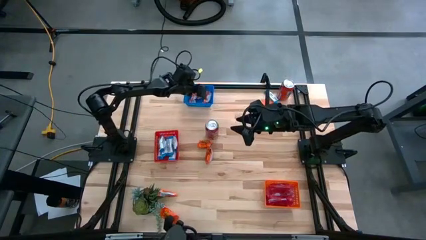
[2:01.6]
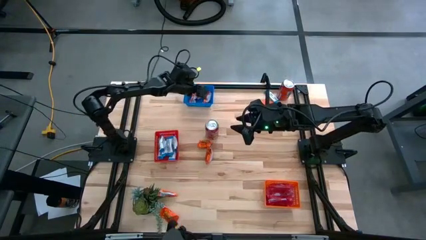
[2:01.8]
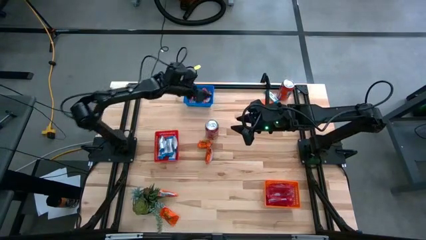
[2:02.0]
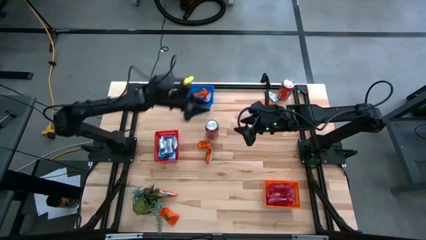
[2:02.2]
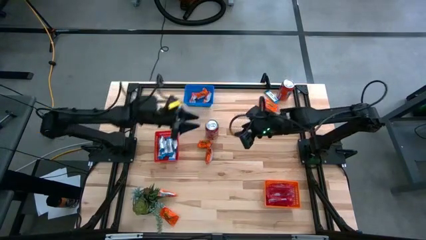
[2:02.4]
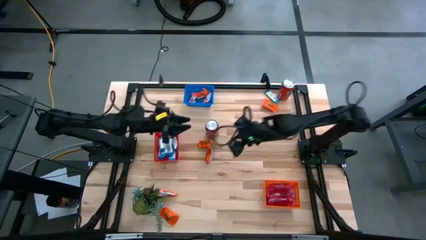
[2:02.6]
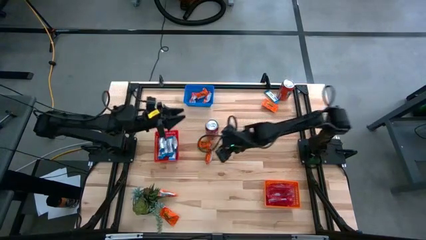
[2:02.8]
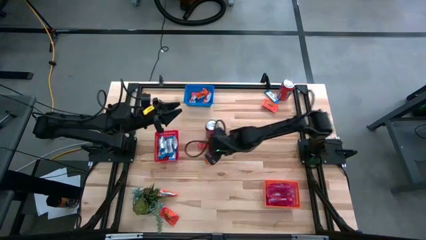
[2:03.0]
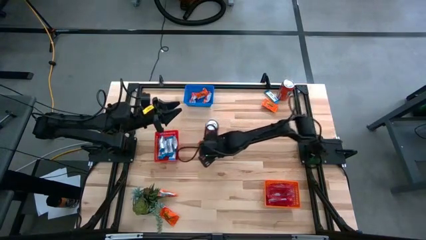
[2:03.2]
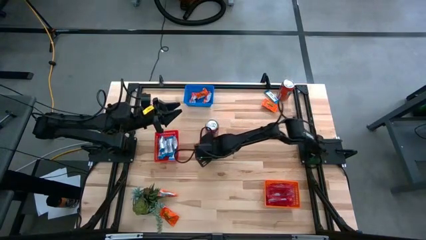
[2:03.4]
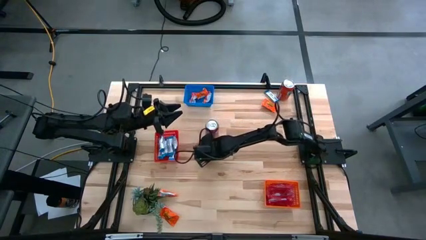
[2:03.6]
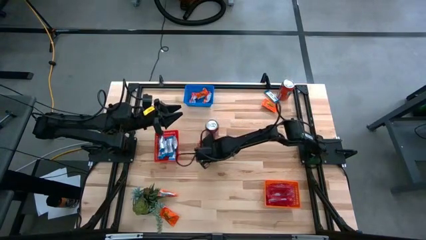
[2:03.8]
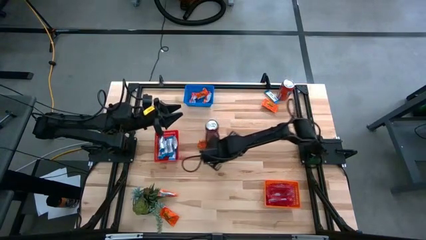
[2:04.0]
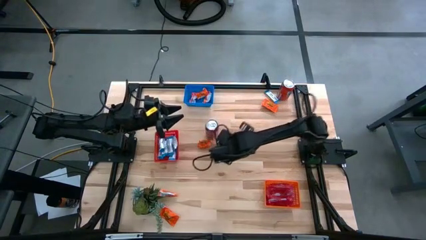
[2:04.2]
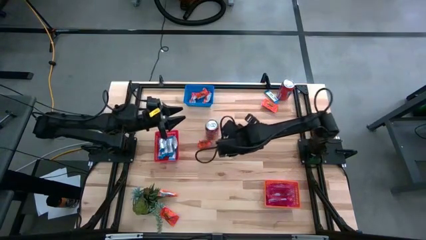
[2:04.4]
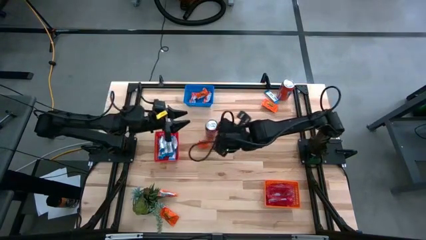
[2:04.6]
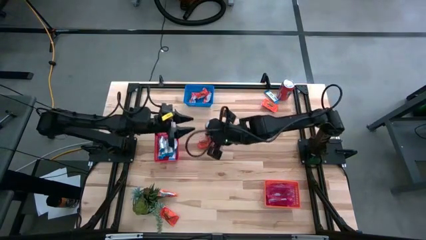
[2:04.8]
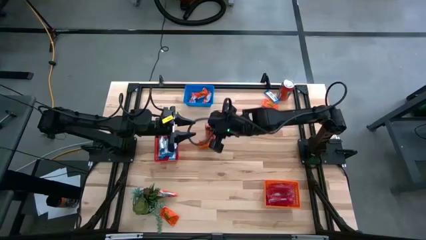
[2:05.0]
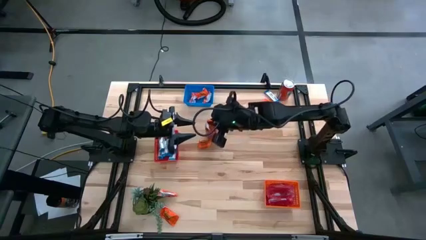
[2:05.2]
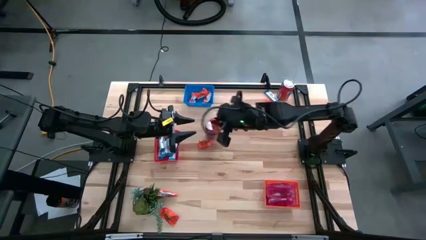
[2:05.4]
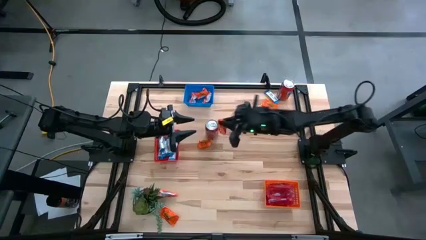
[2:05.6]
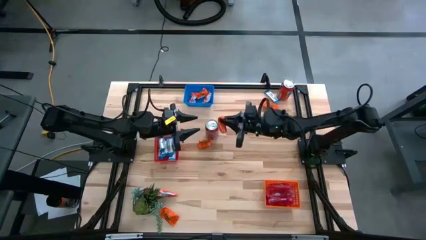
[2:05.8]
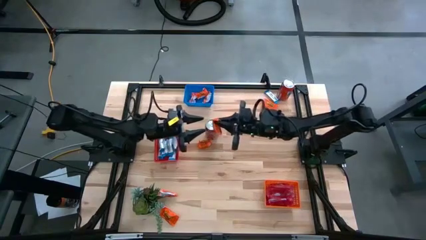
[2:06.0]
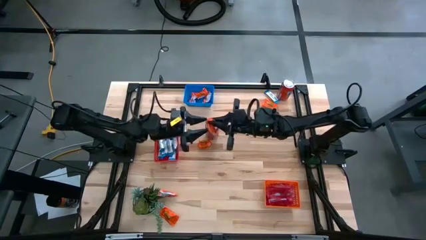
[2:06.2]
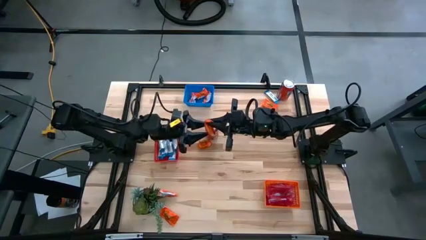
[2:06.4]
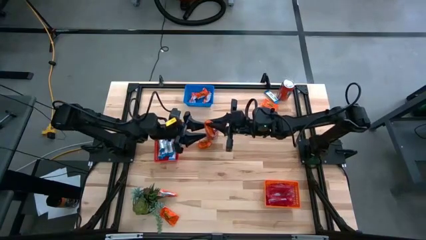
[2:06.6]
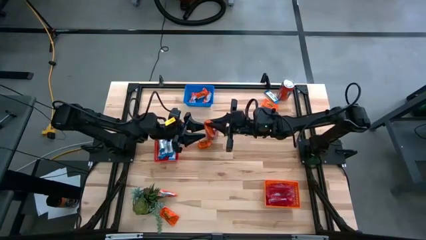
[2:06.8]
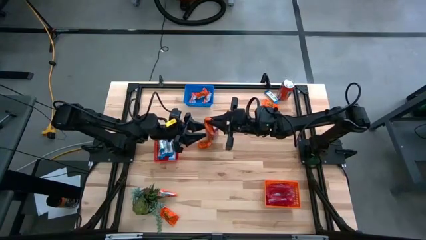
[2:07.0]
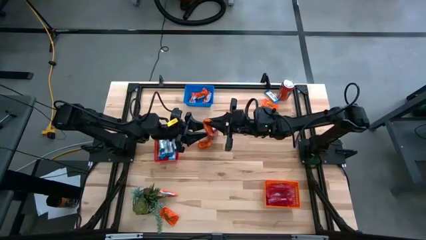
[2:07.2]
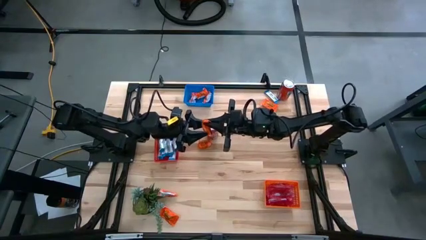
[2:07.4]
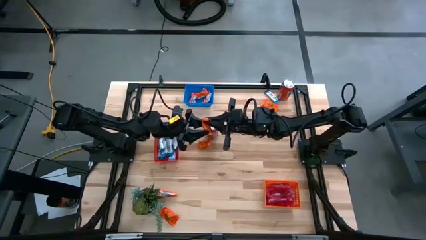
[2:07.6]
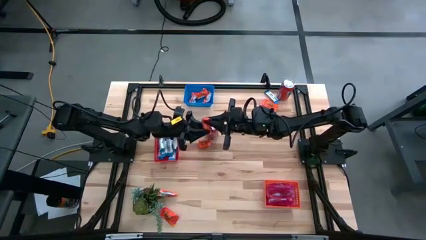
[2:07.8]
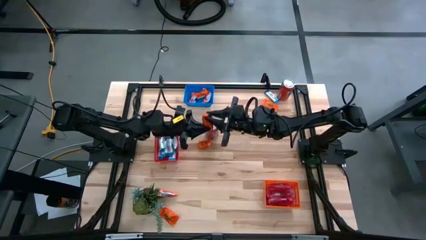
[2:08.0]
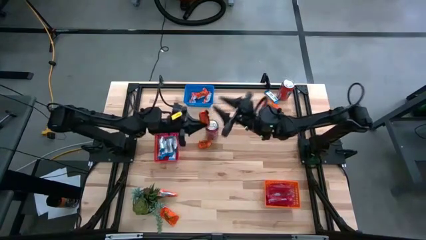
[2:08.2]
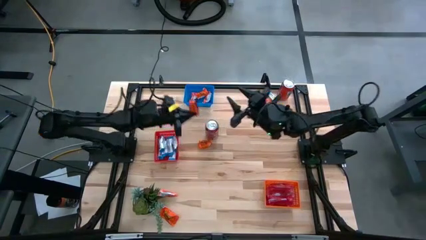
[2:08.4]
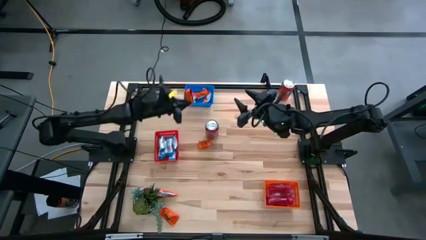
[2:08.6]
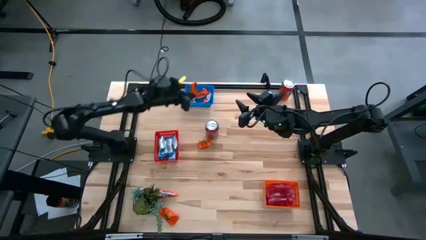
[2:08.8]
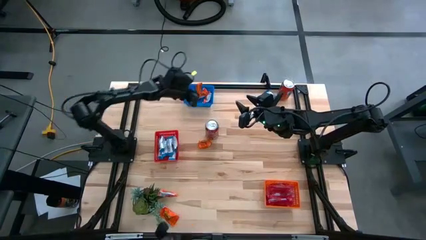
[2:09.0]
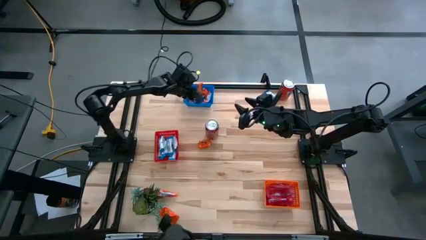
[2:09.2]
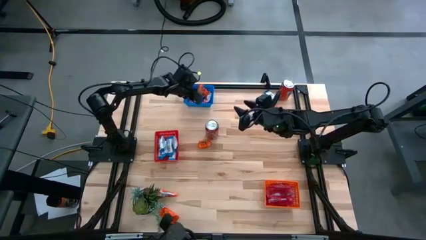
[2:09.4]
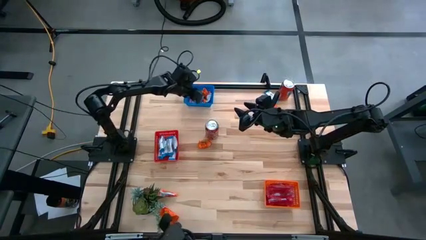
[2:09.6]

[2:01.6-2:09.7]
Task: Sort candy
Put the orange chocolate into the blue bin

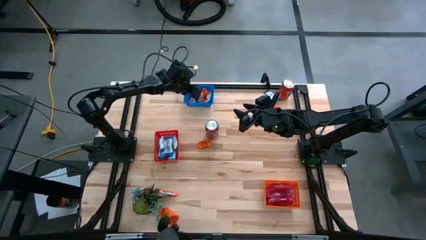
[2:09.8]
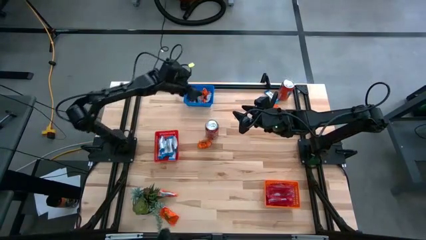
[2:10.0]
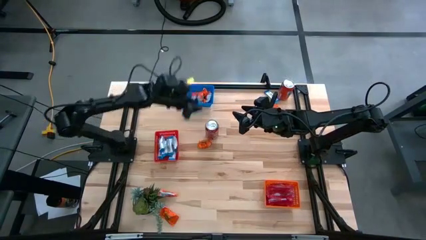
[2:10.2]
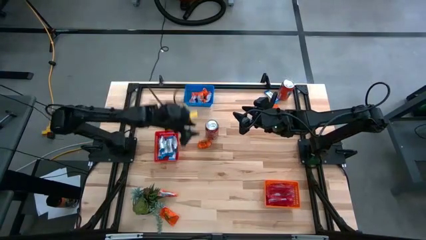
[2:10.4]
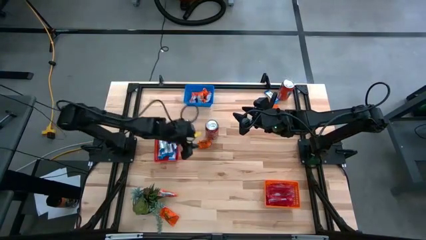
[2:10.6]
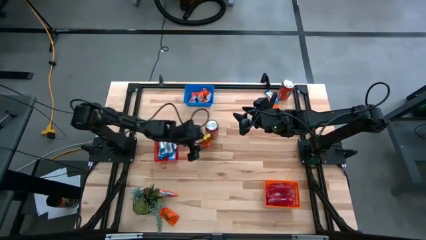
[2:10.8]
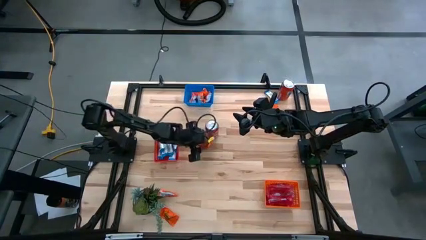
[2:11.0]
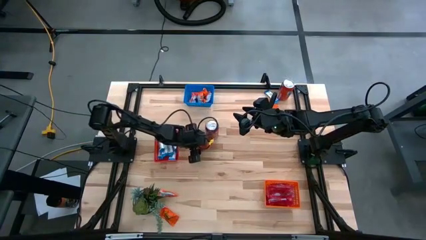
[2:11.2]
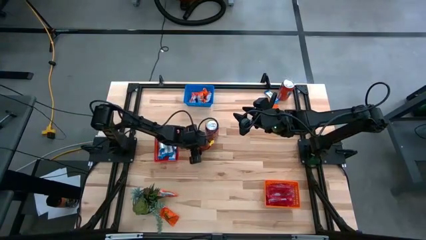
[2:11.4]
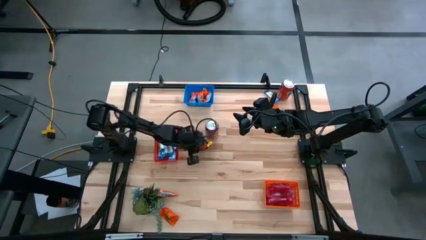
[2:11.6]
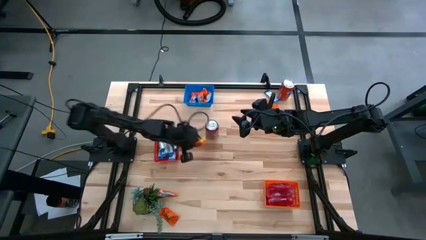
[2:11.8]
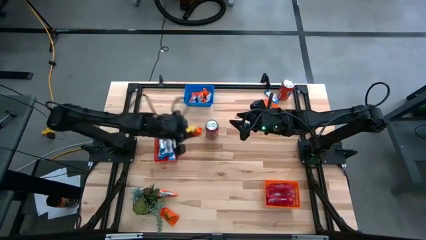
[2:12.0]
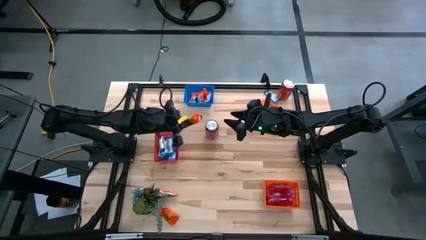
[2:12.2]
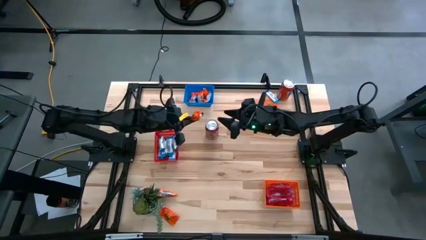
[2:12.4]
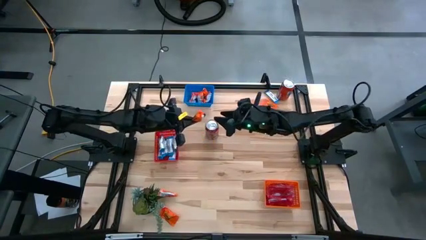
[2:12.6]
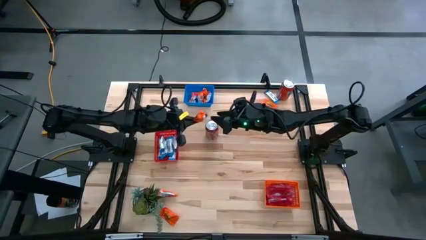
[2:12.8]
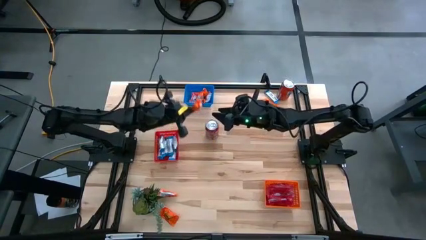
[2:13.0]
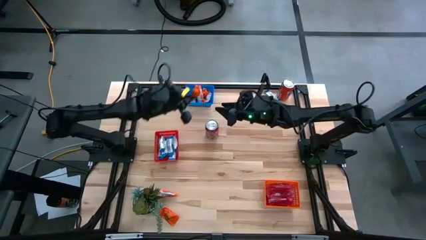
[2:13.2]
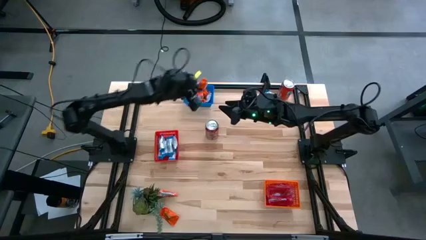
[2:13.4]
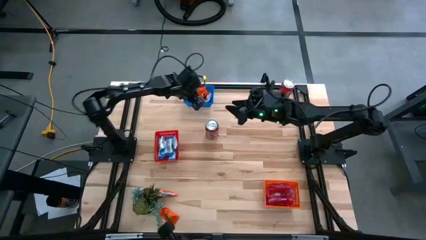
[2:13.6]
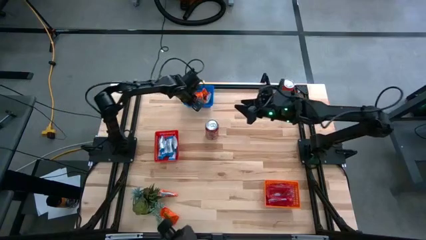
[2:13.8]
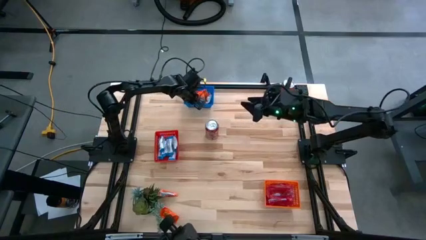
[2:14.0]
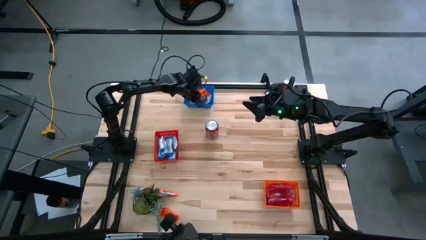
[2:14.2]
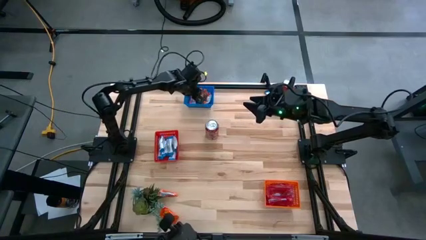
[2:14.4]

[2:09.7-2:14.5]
Put the orange chocolate into the blue bin

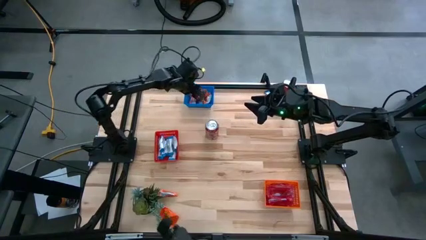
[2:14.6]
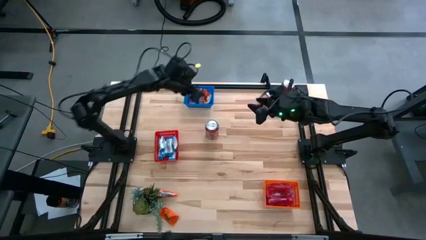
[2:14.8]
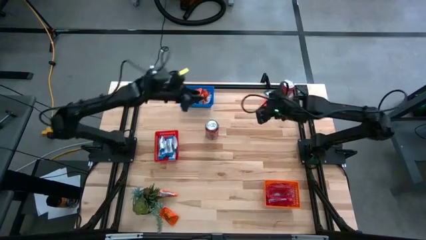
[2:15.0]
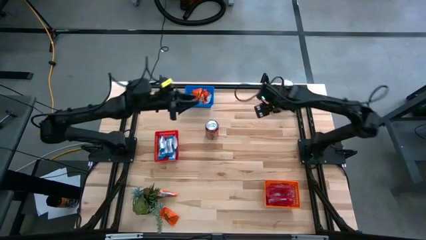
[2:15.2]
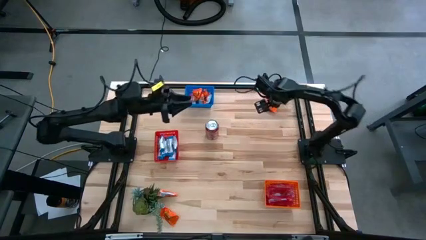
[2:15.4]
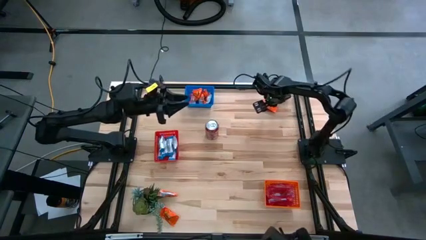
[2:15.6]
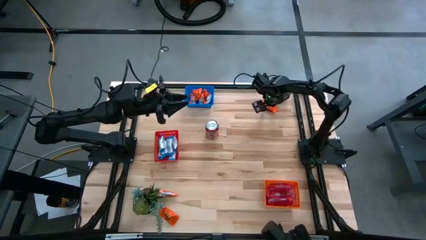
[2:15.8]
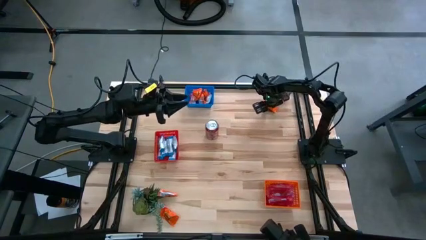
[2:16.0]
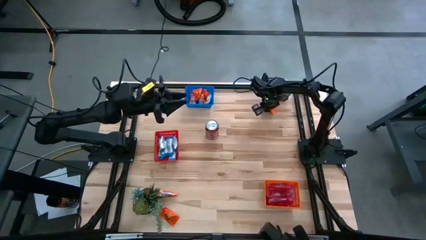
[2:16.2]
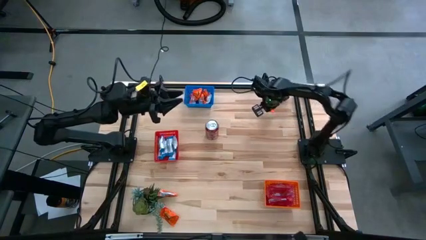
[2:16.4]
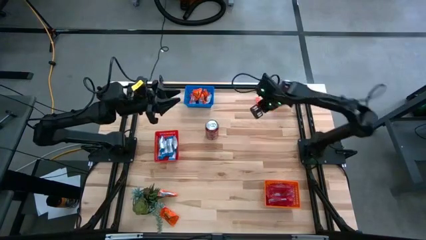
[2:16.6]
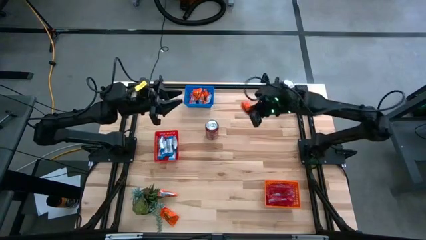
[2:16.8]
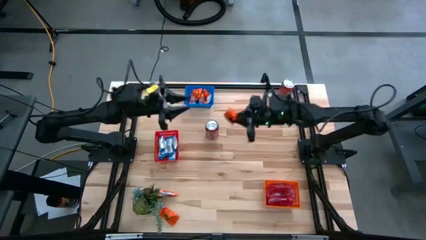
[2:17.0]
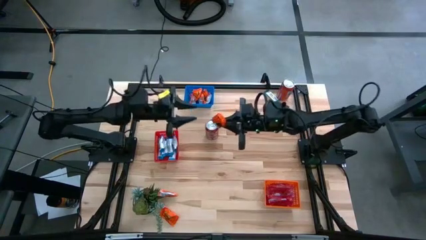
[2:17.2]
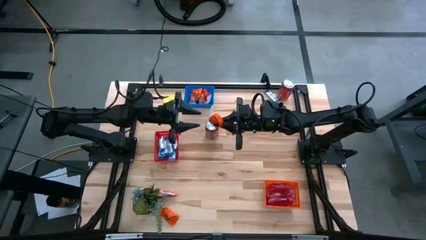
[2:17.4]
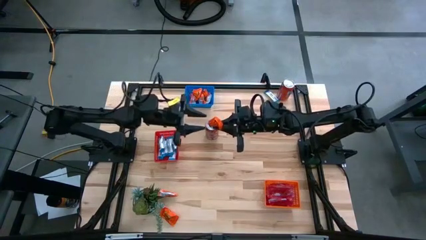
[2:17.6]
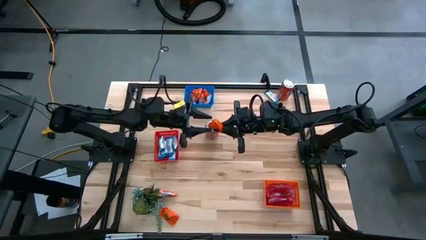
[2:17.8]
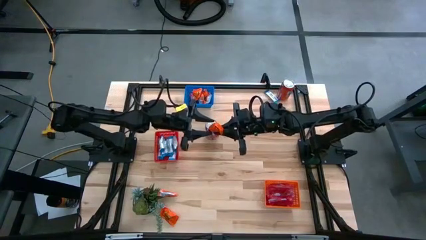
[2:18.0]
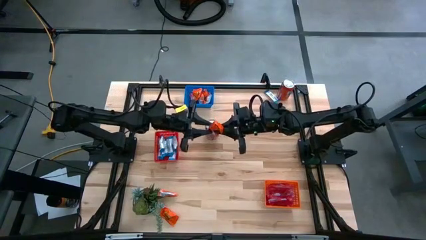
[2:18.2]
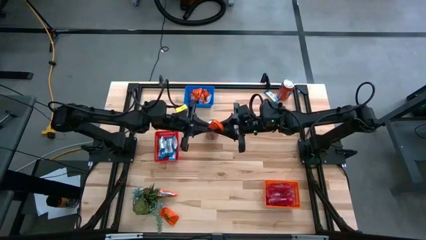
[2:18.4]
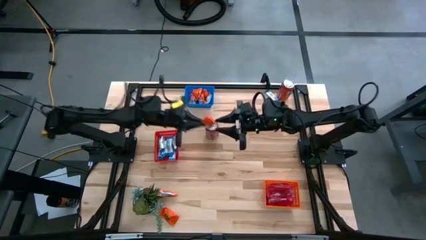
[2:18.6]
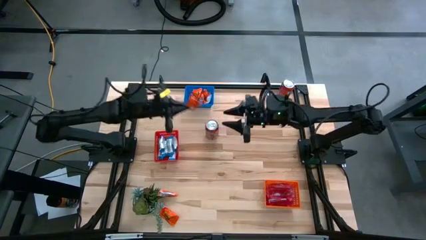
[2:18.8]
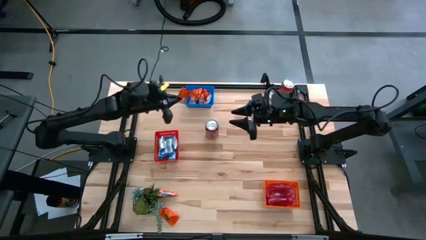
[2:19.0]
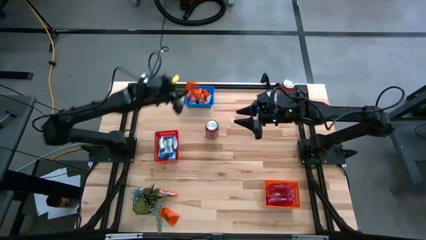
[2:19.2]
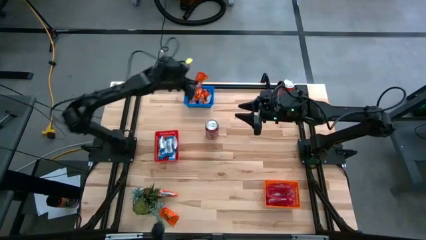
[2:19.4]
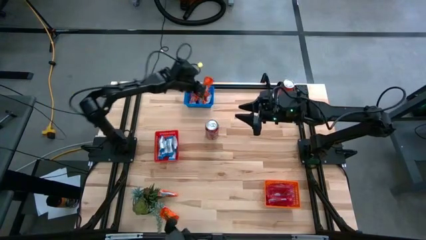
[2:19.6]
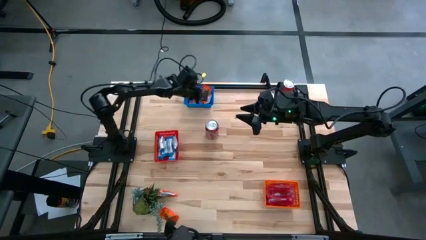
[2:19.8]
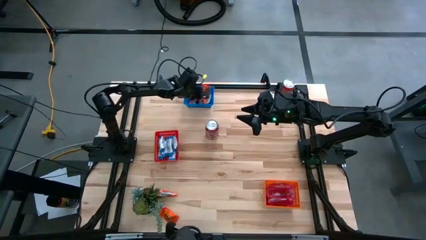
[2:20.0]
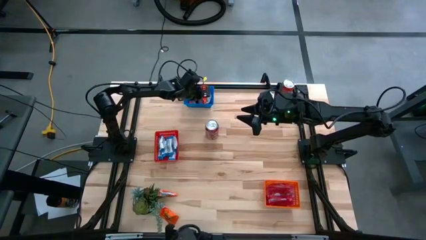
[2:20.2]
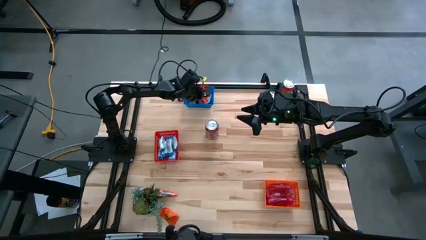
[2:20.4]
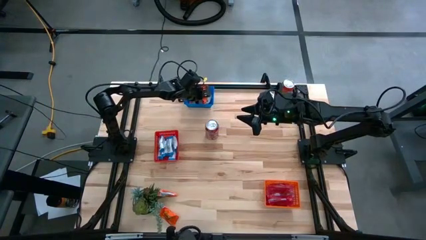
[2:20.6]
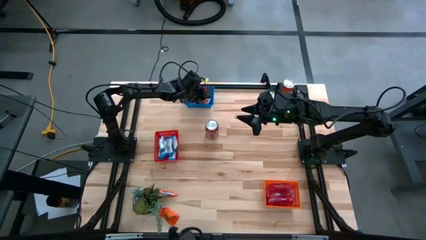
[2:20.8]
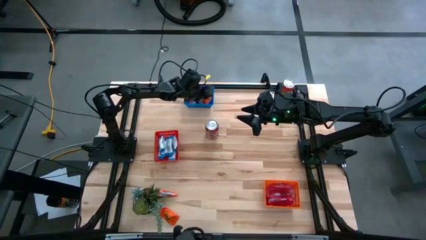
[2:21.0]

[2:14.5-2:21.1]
Put the orange chocolate into the blue bin
